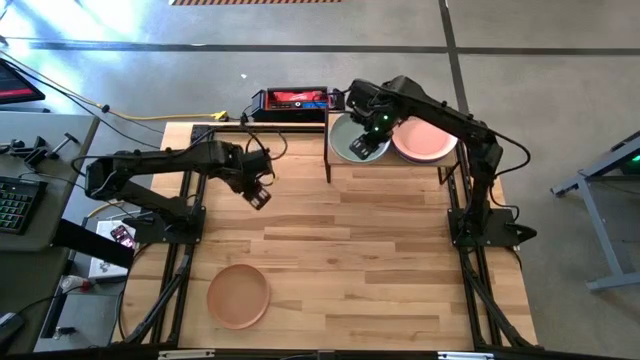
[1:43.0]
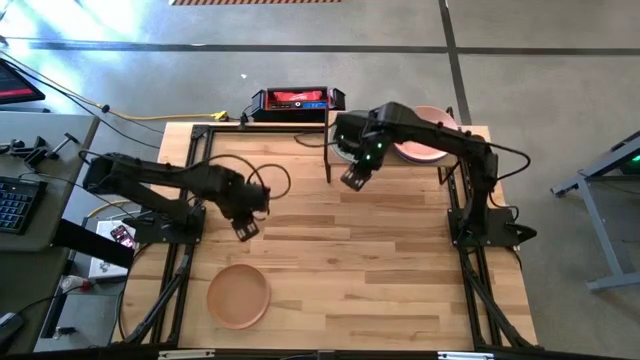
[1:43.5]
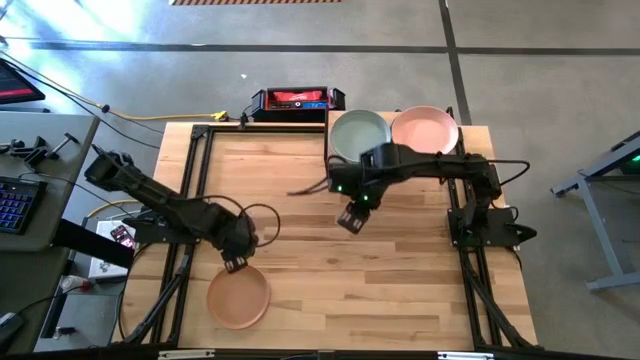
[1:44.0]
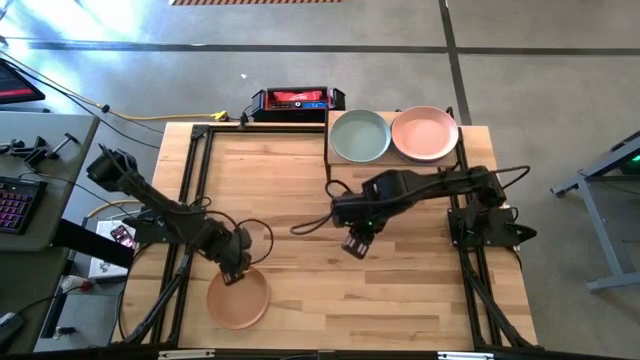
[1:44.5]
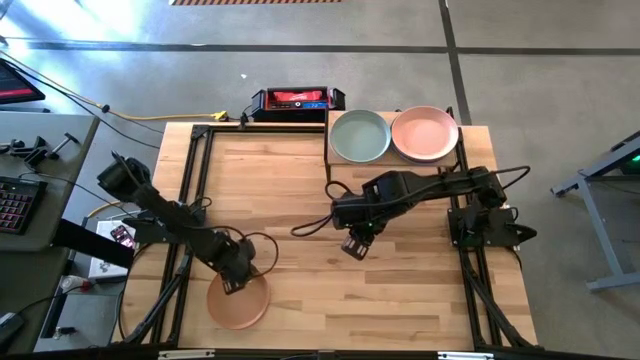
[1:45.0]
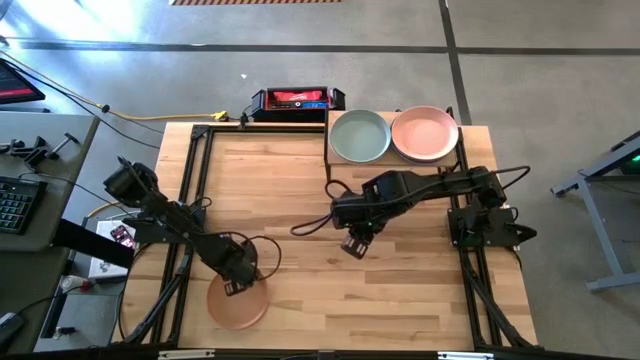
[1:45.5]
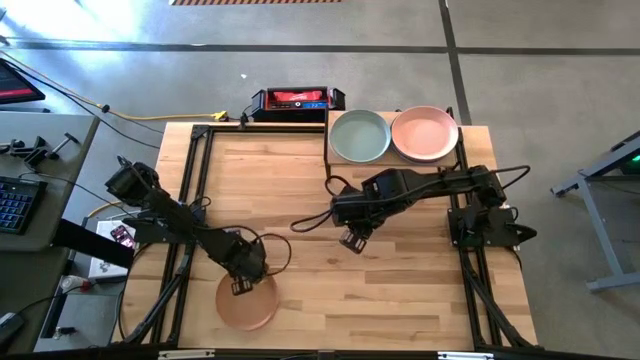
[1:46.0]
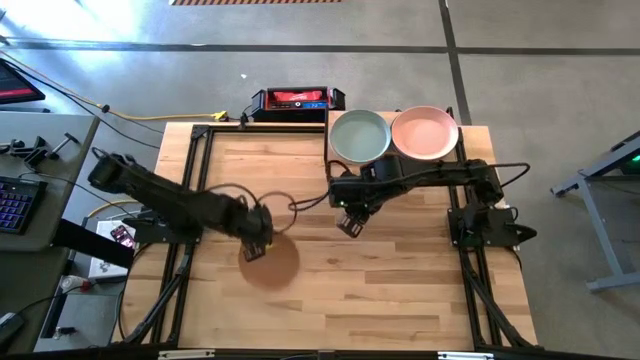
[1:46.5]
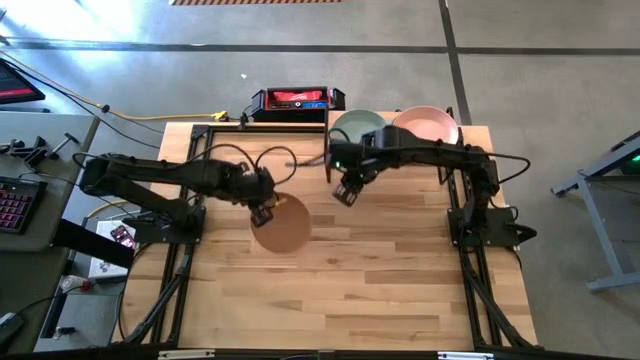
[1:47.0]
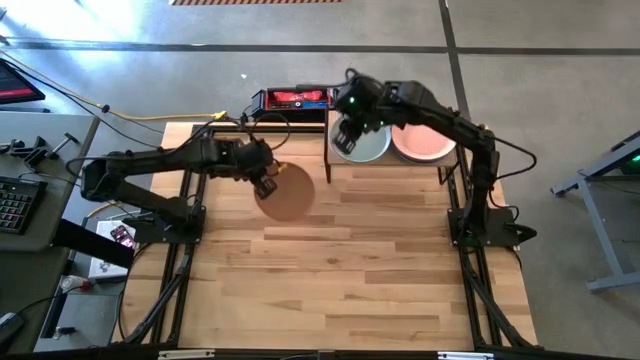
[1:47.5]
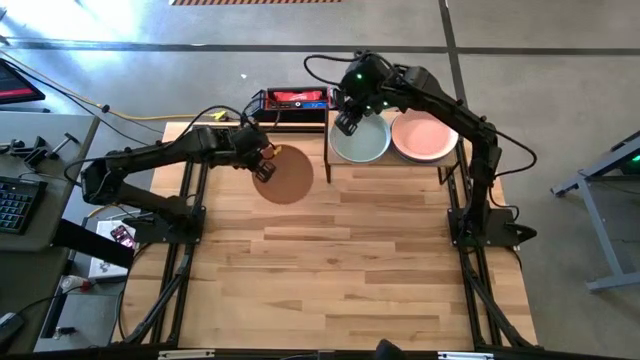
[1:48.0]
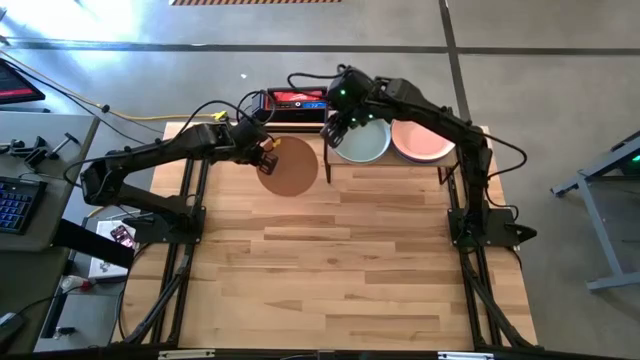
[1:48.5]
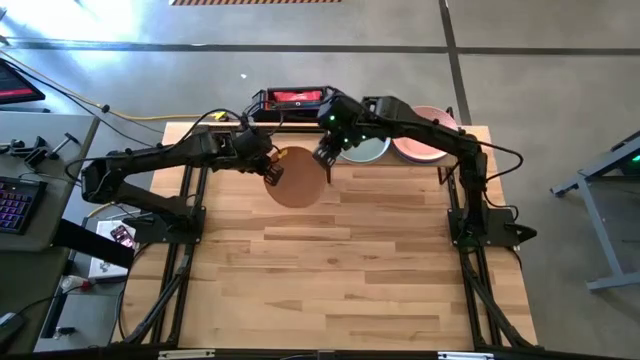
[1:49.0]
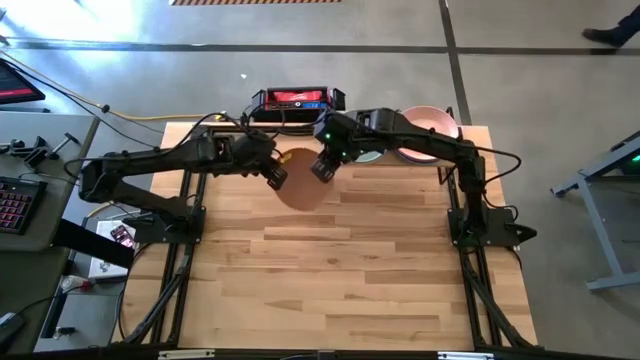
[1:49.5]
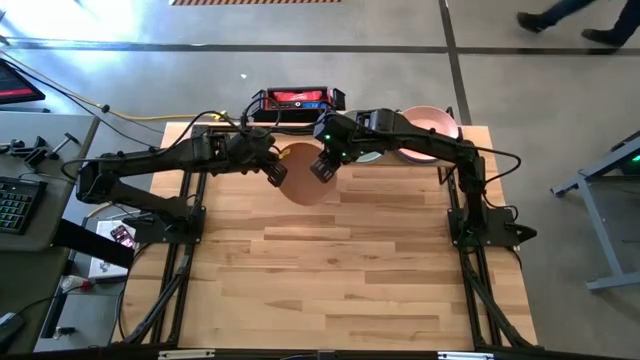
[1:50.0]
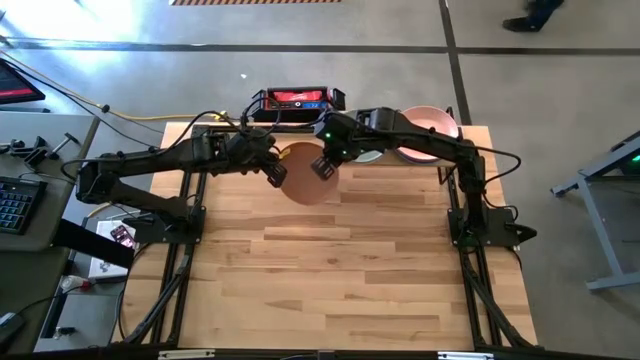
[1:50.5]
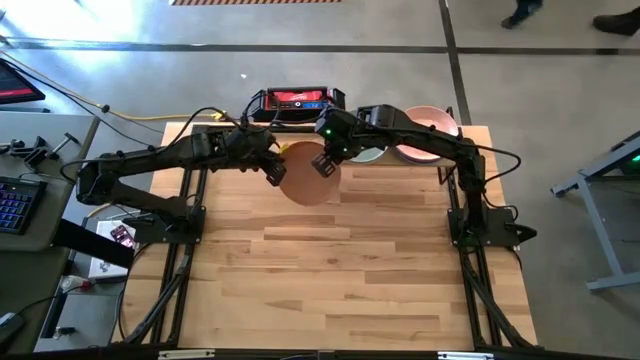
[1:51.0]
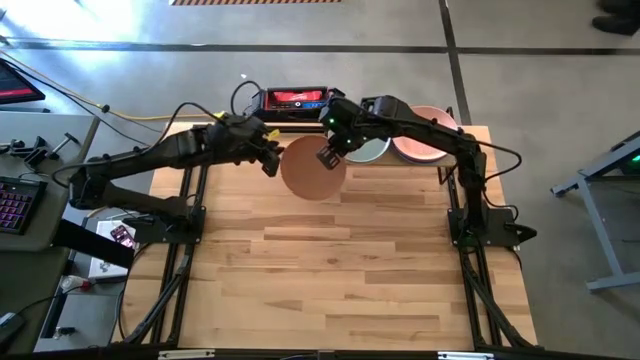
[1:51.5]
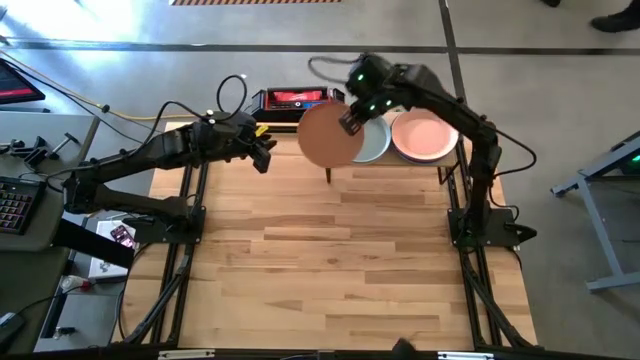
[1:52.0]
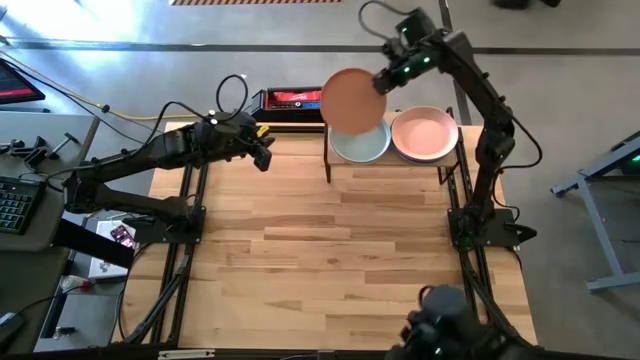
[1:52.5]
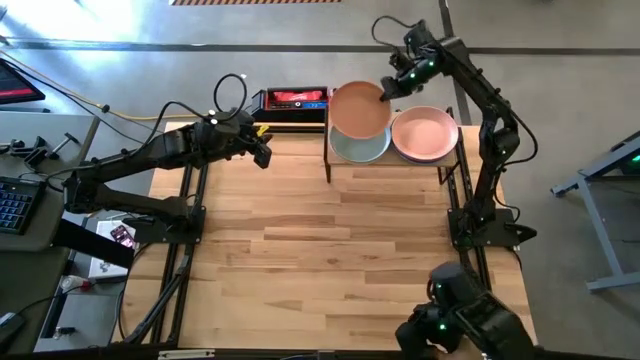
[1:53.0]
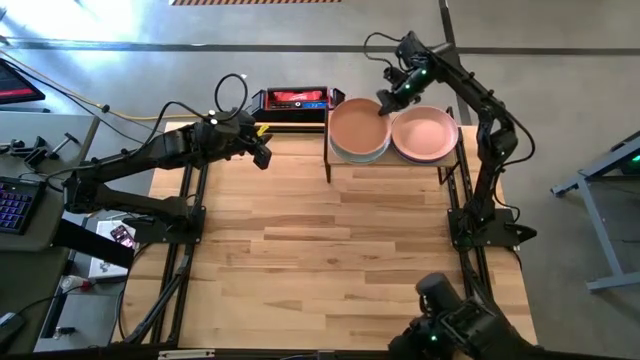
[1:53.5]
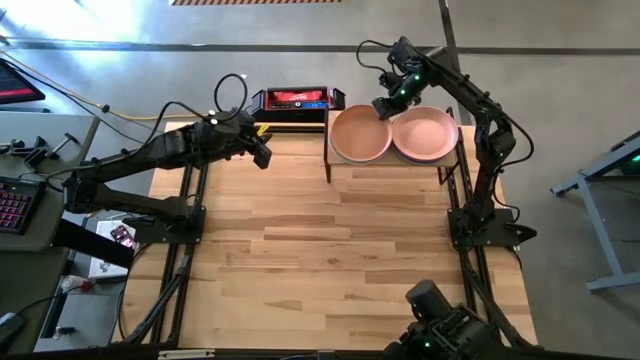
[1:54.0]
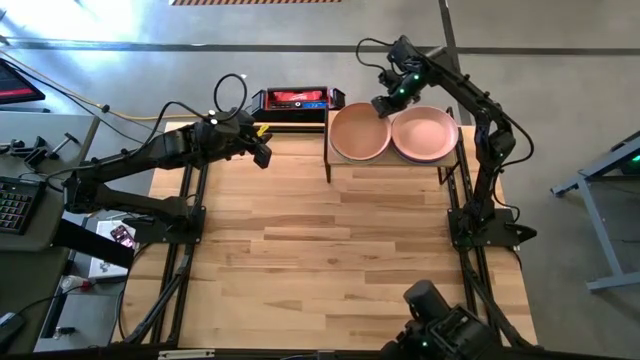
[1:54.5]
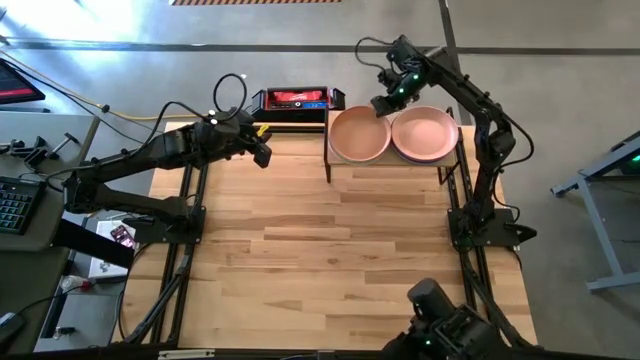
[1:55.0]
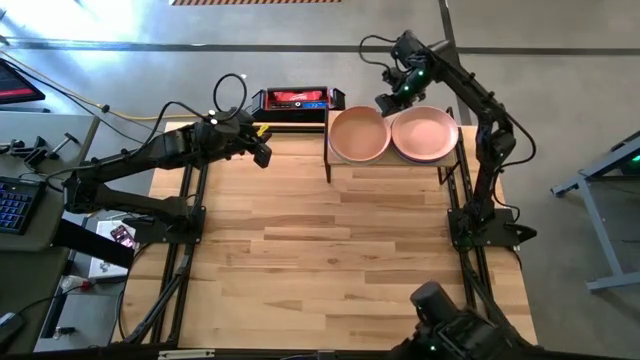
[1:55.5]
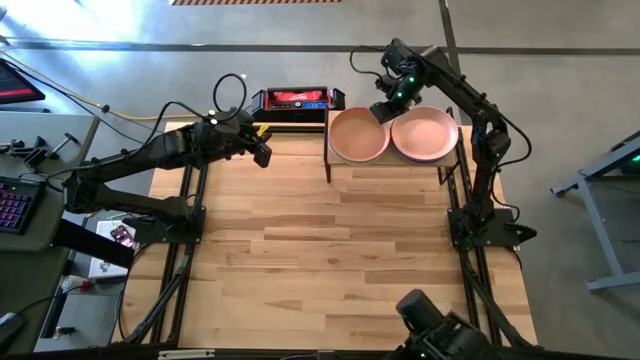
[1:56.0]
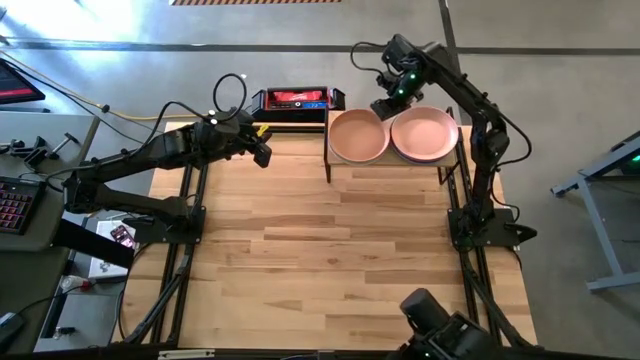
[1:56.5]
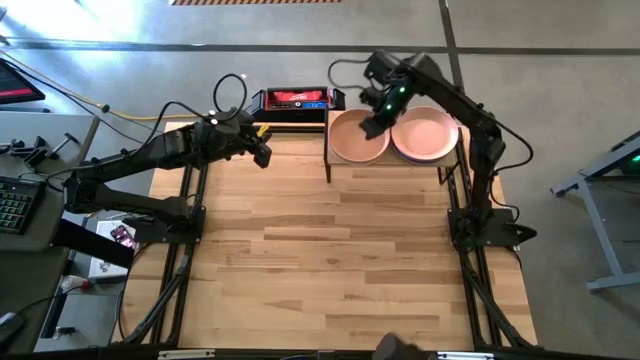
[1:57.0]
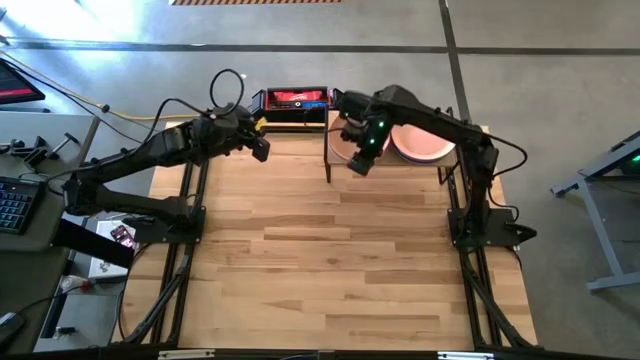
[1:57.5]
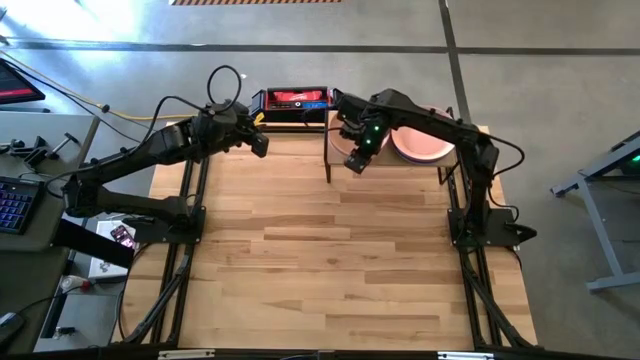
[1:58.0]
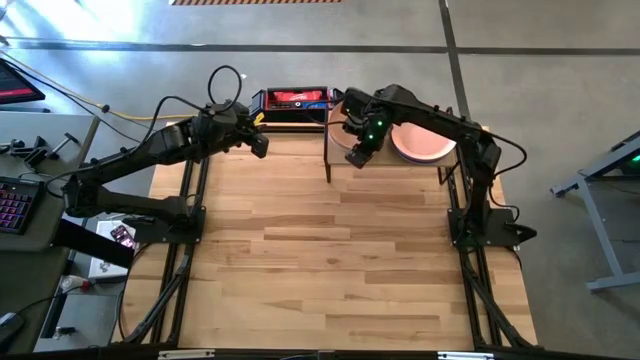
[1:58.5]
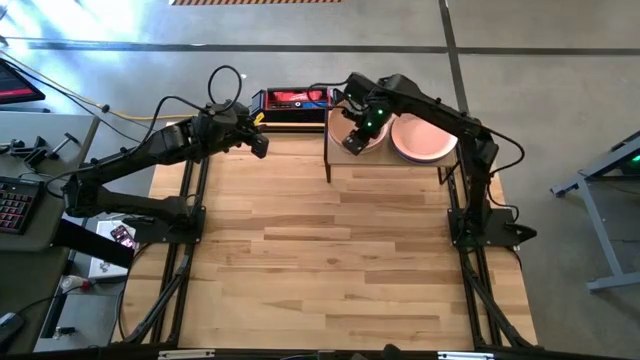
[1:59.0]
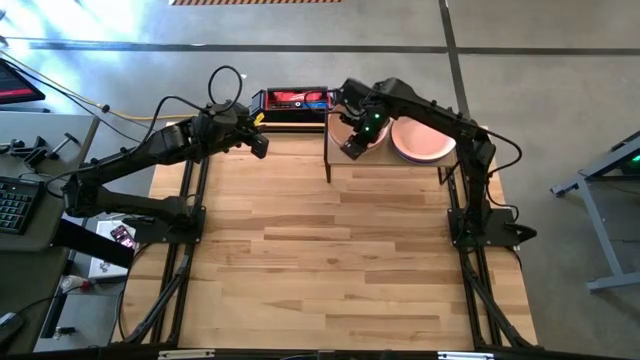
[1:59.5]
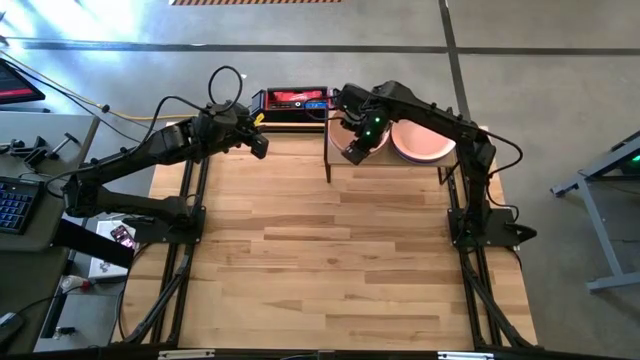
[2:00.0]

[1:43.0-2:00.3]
Task: Place and stack plates onto a shelf
Stack the brown plate on top of the light blue plate on the shelf

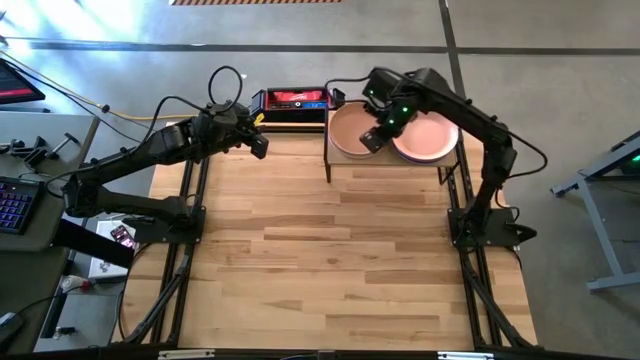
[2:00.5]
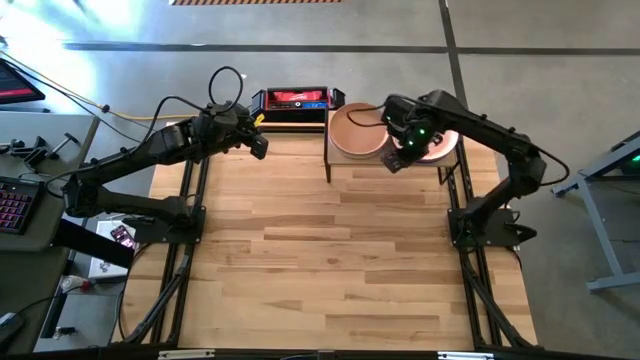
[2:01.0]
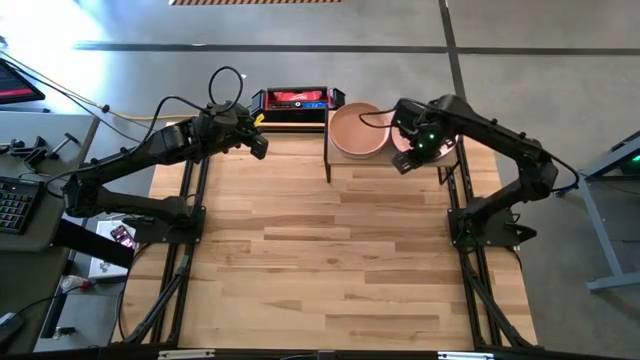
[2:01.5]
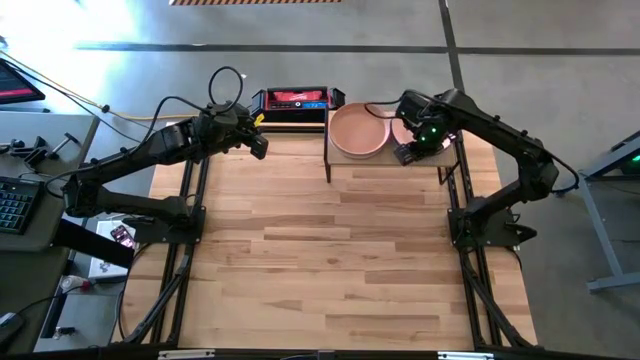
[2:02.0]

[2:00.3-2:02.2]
Adjust the stacked plates on the shelf

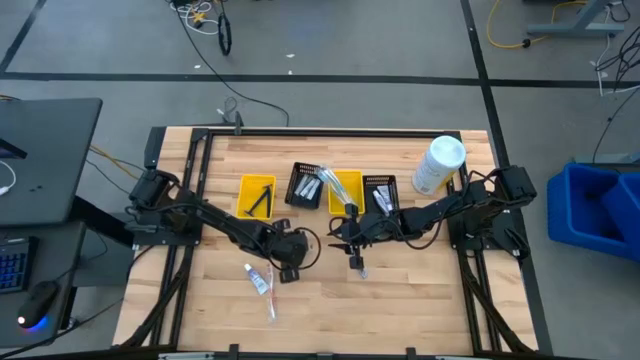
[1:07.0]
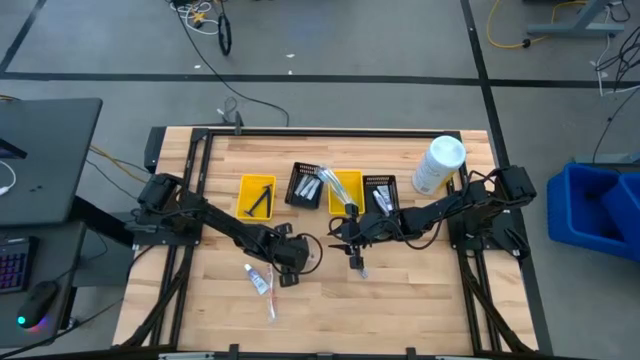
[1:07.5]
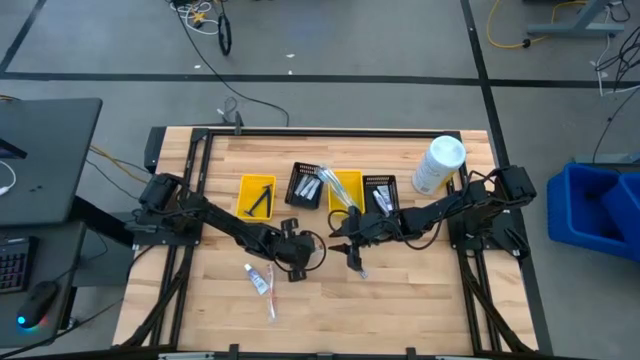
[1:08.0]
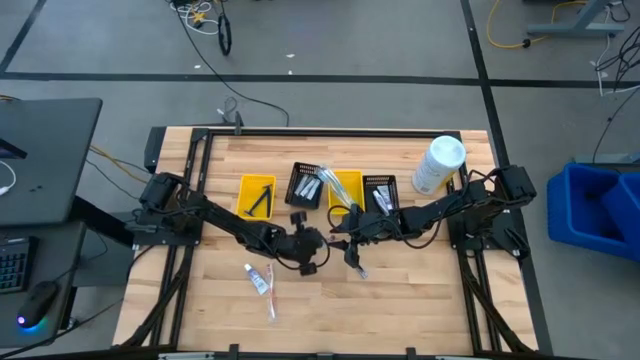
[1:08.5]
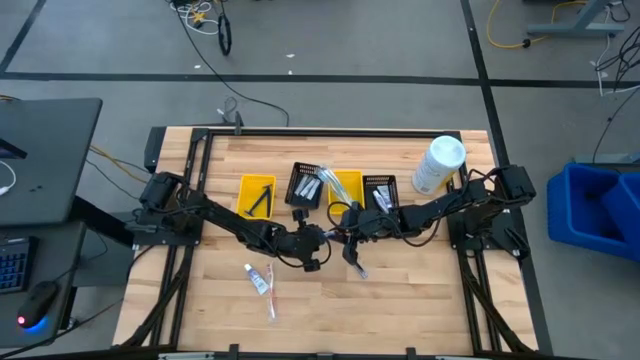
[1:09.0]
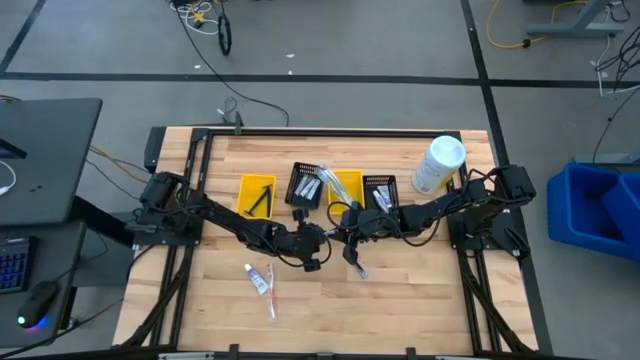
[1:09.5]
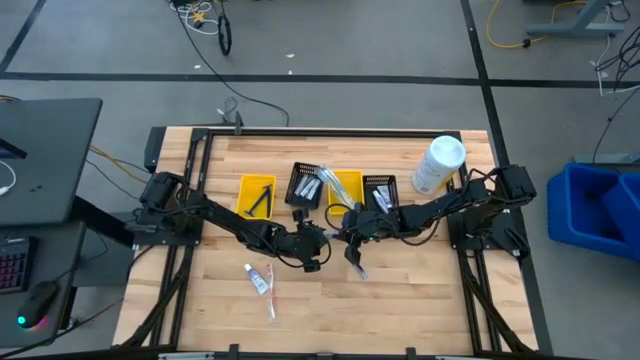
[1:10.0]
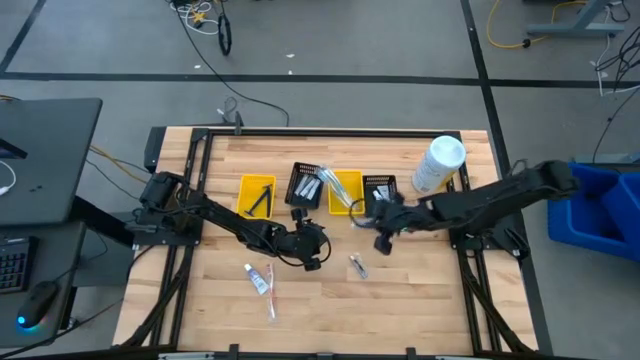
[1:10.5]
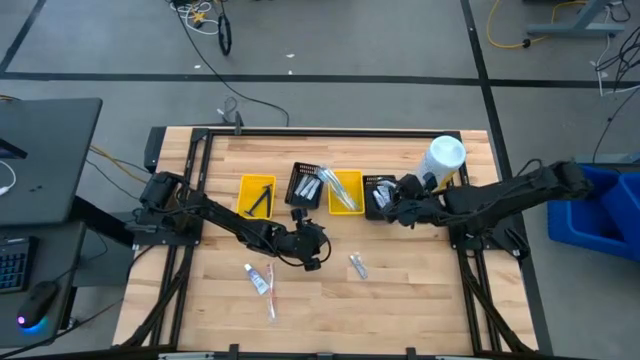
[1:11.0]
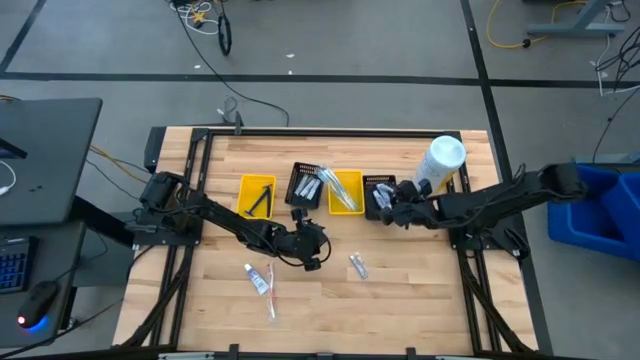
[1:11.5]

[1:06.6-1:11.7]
Task: Pick & Place Travel size toiletries
Put the violet toothpaste into the right black bin
